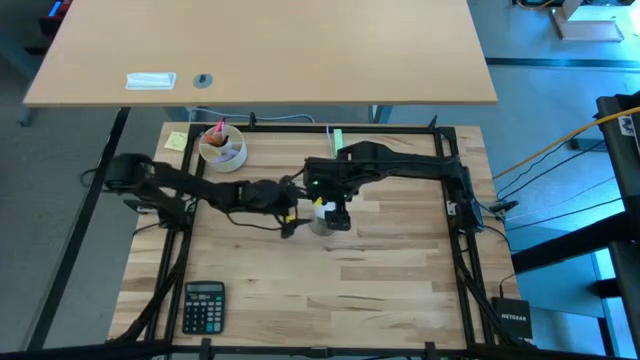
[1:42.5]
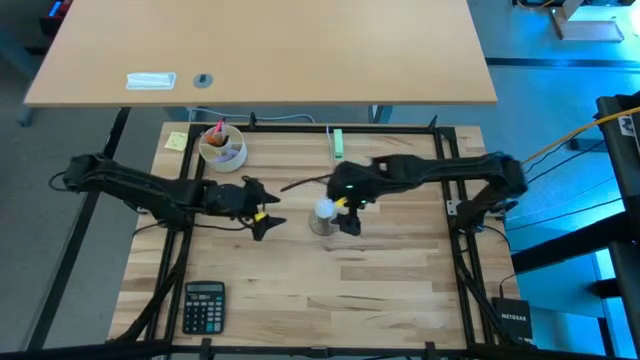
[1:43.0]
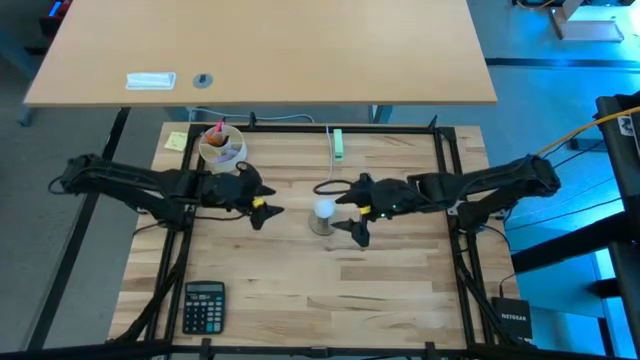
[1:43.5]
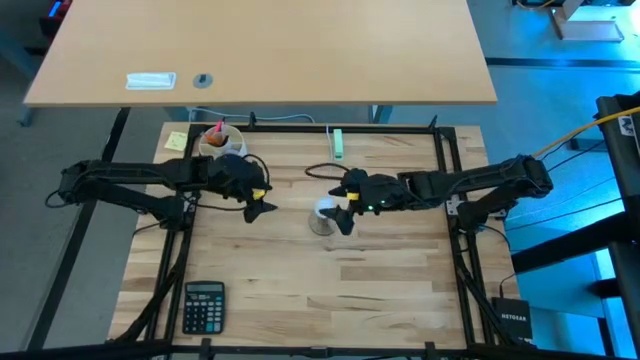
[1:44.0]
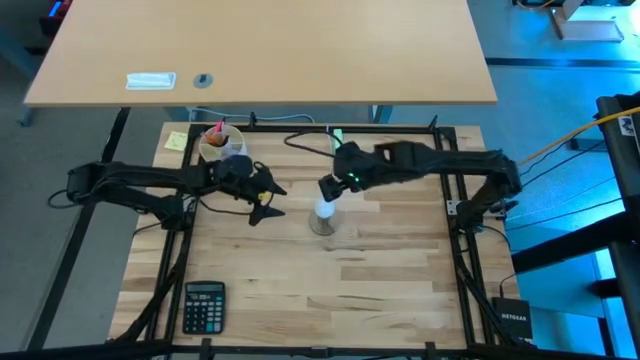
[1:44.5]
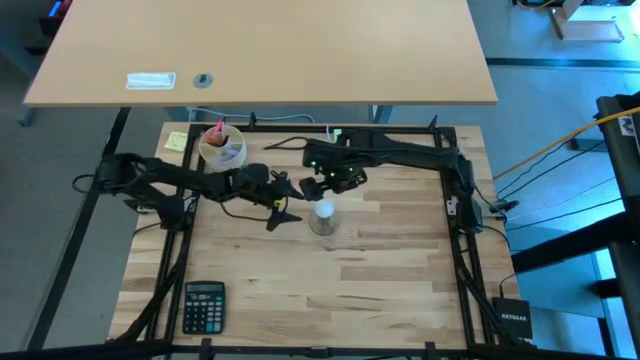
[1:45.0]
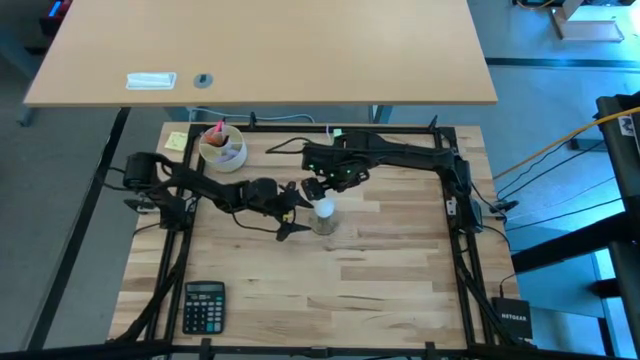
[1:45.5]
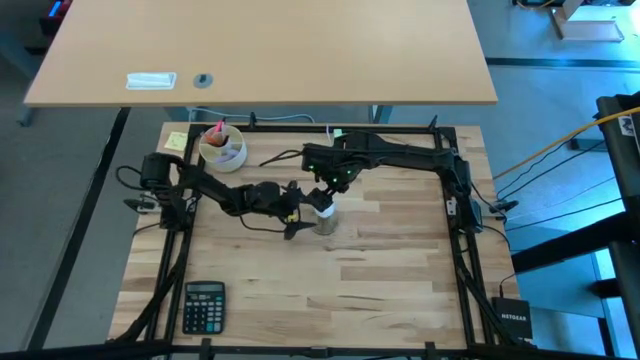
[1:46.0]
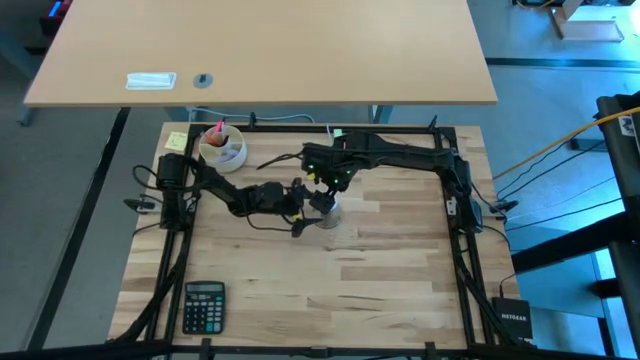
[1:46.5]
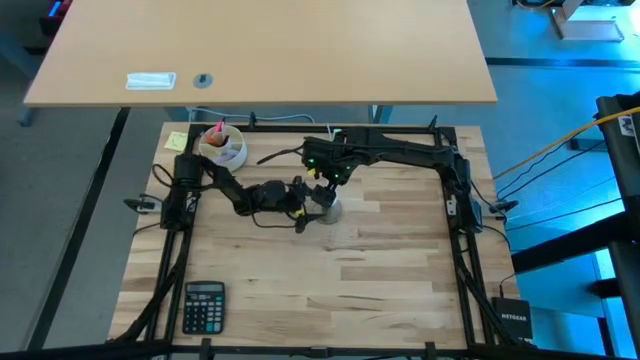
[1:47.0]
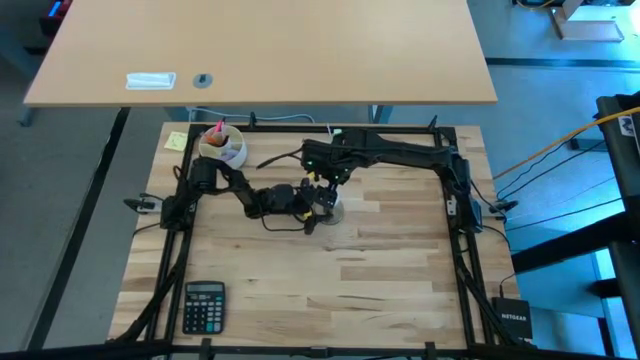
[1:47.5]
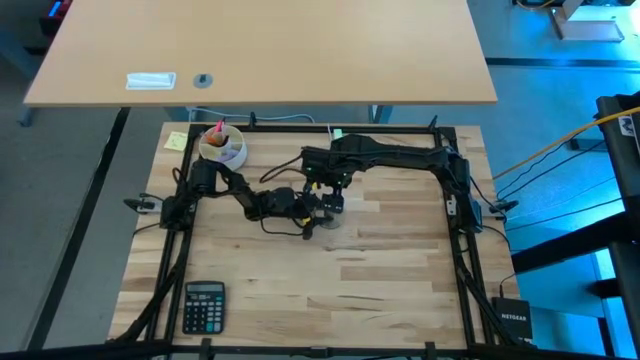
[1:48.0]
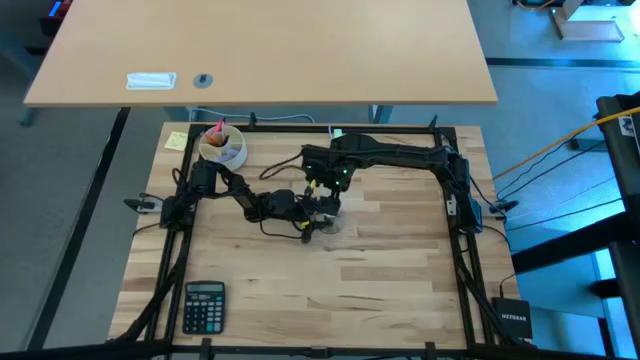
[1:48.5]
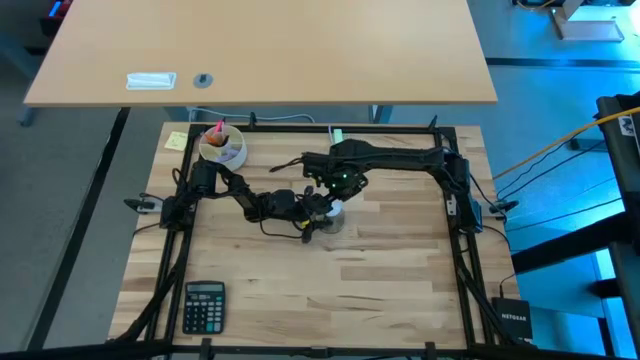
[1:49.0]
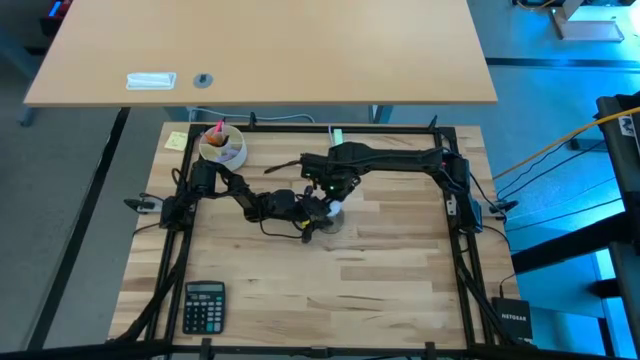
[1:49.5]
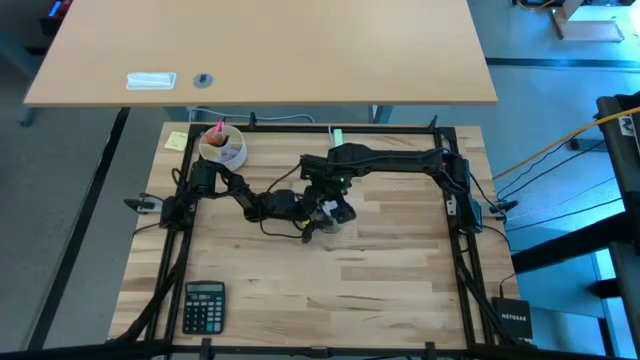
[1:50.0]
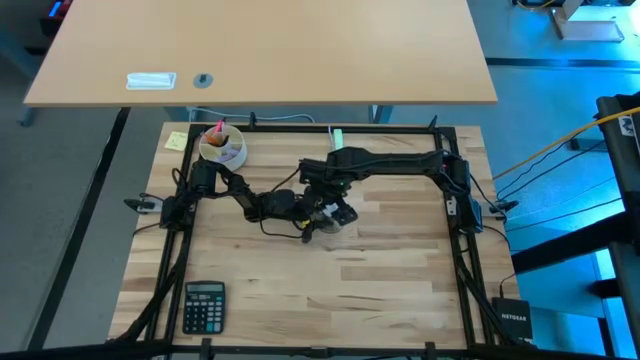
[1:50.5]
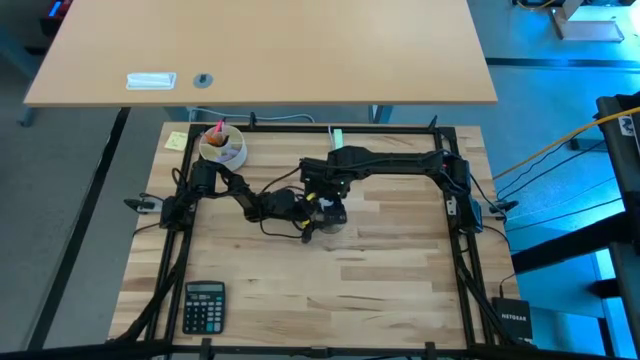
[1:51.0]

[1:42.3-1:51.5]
Task: Screw lightbulb
Remove the lightbulb from the lamp

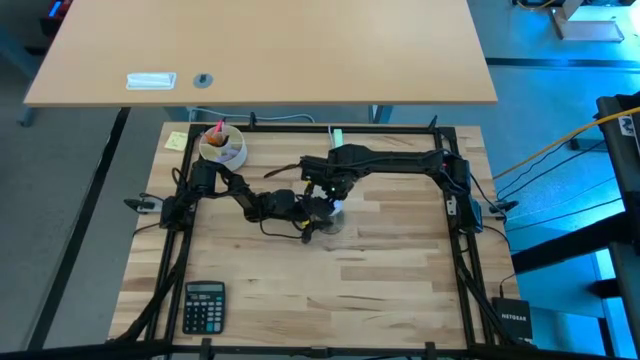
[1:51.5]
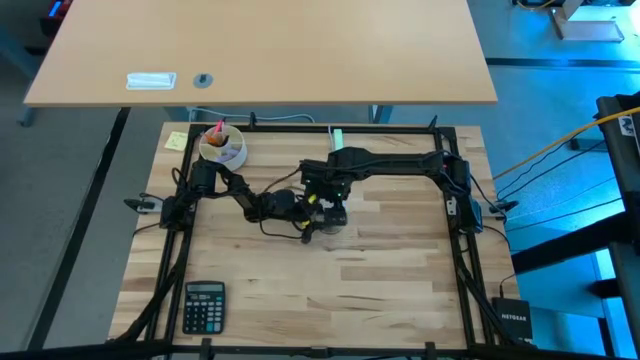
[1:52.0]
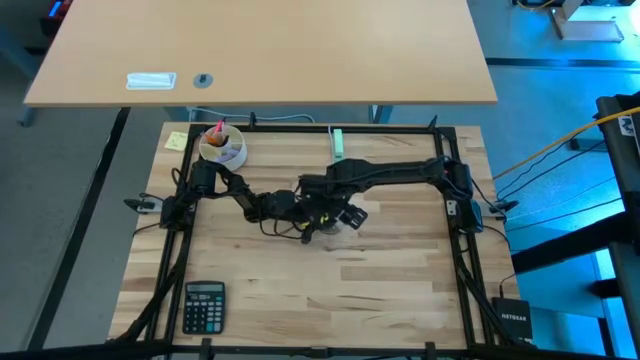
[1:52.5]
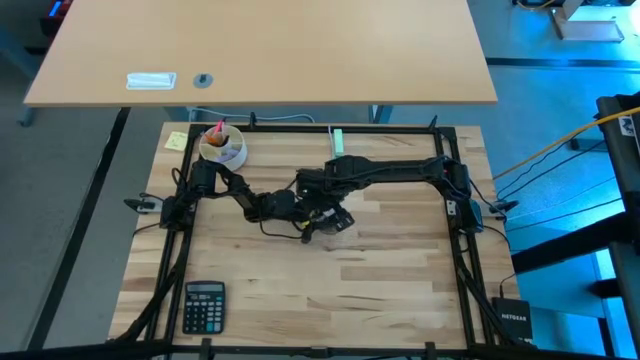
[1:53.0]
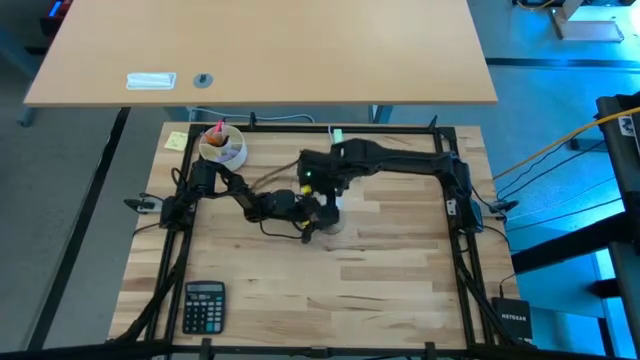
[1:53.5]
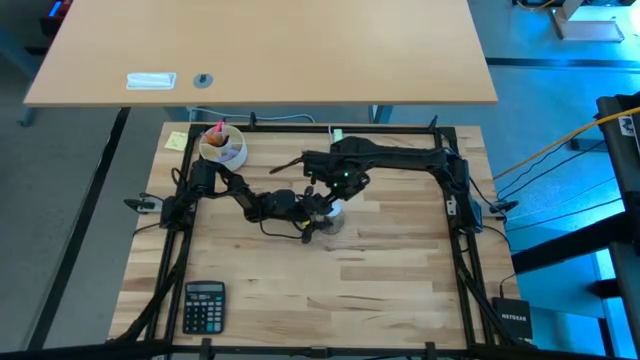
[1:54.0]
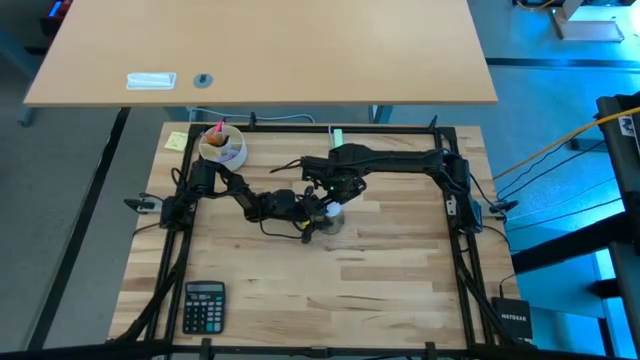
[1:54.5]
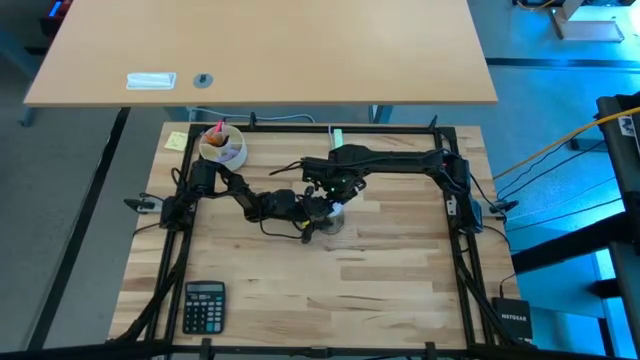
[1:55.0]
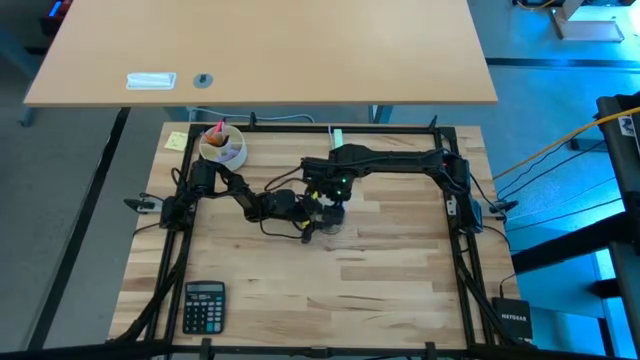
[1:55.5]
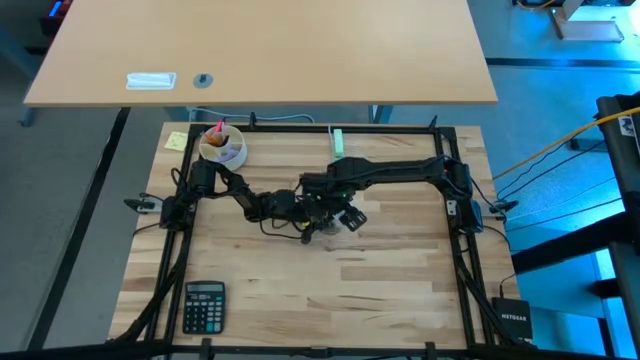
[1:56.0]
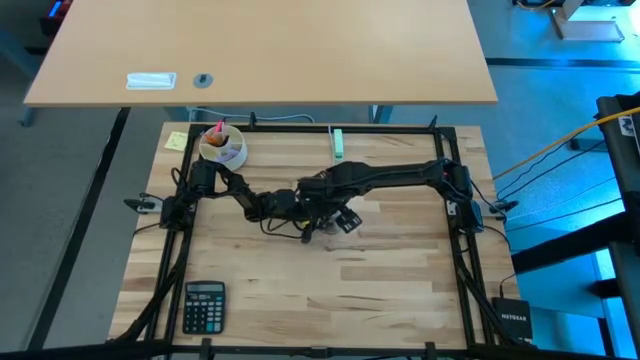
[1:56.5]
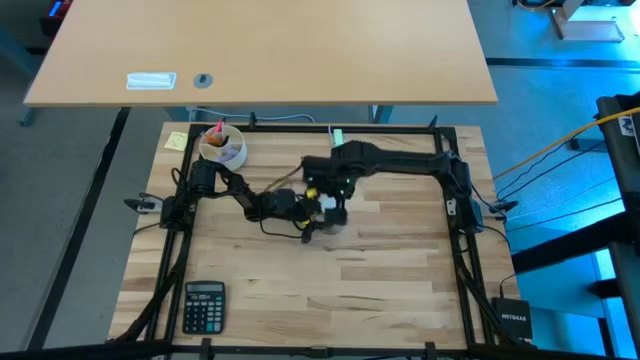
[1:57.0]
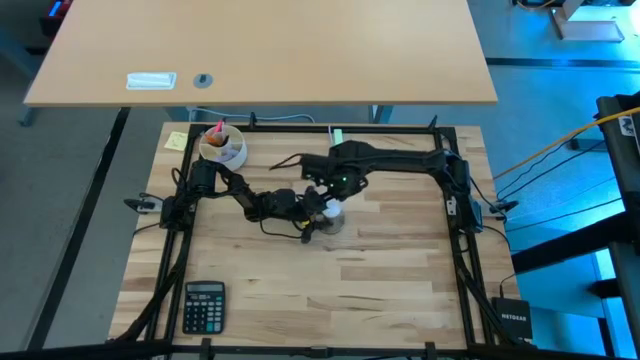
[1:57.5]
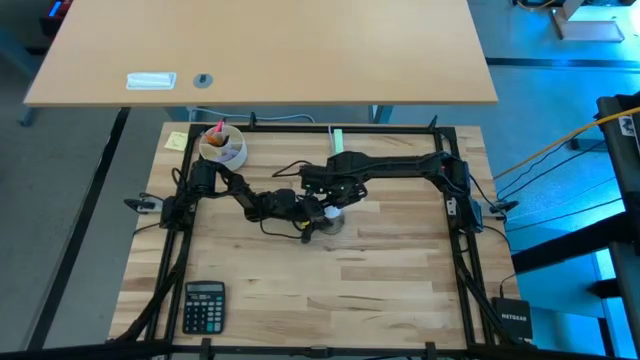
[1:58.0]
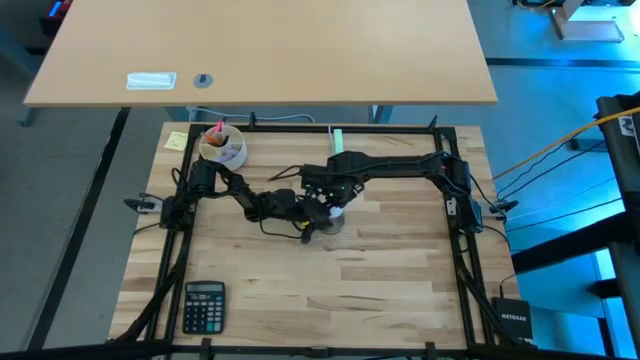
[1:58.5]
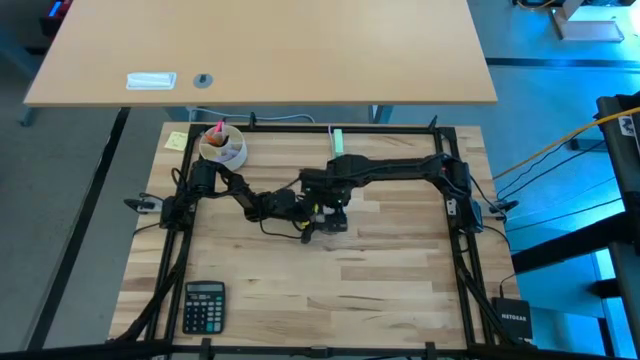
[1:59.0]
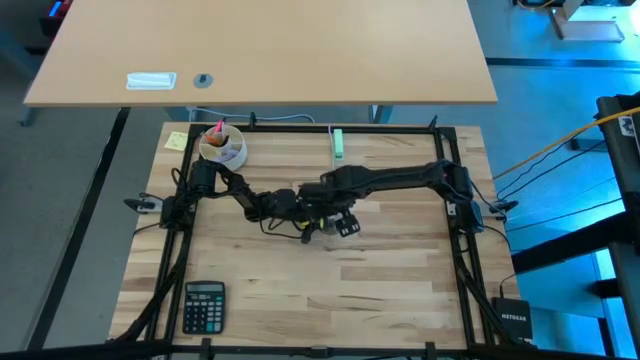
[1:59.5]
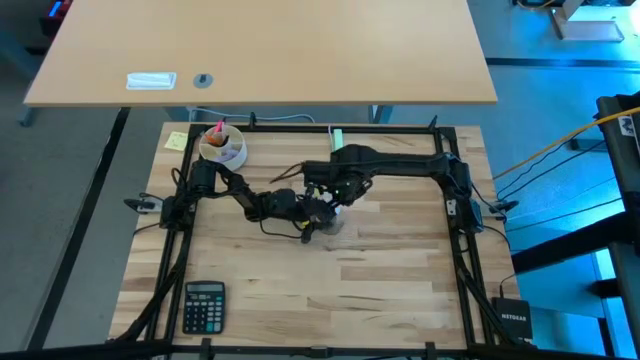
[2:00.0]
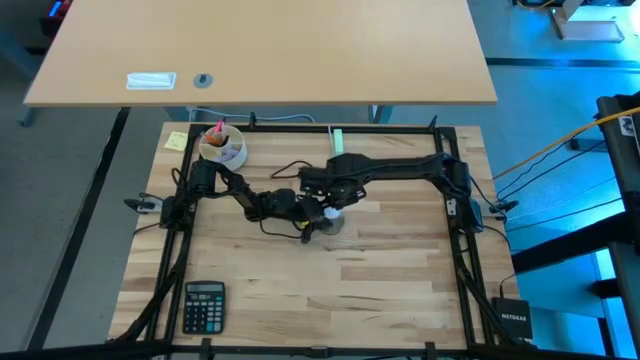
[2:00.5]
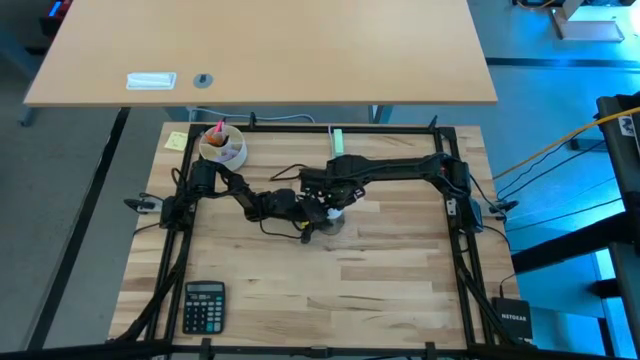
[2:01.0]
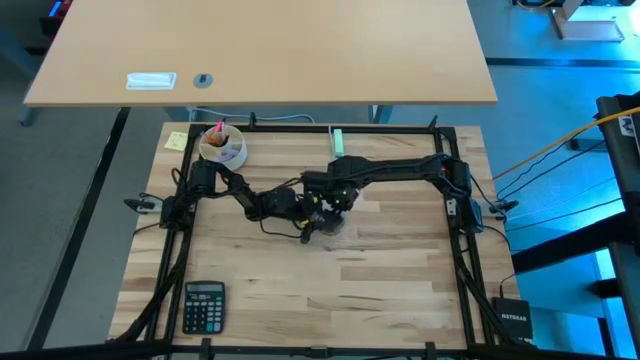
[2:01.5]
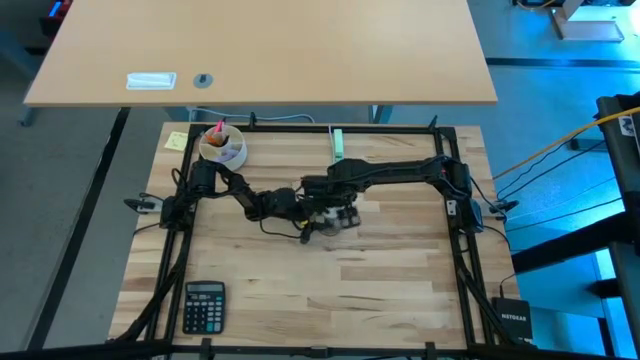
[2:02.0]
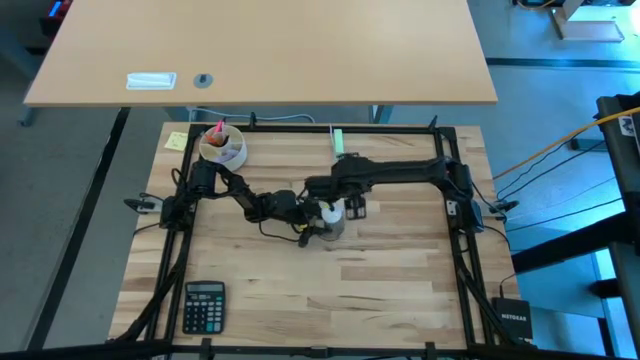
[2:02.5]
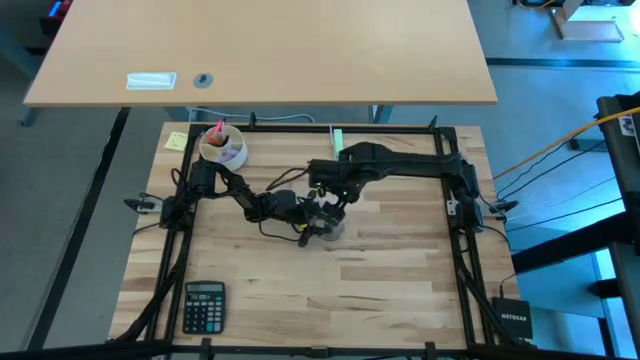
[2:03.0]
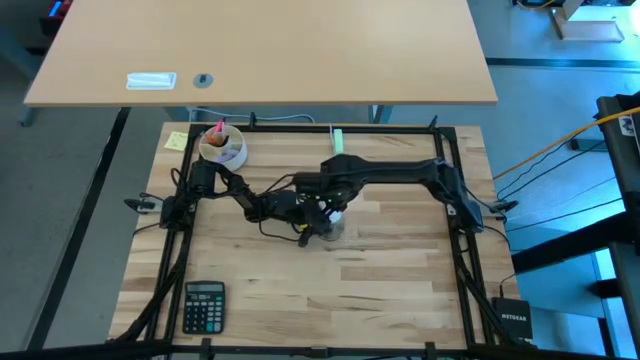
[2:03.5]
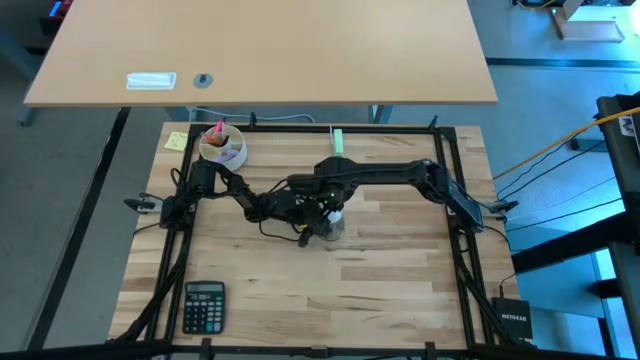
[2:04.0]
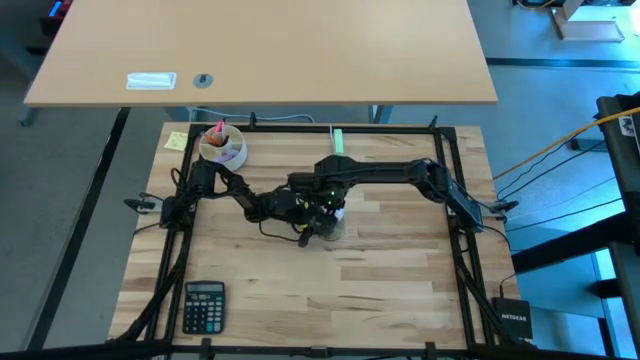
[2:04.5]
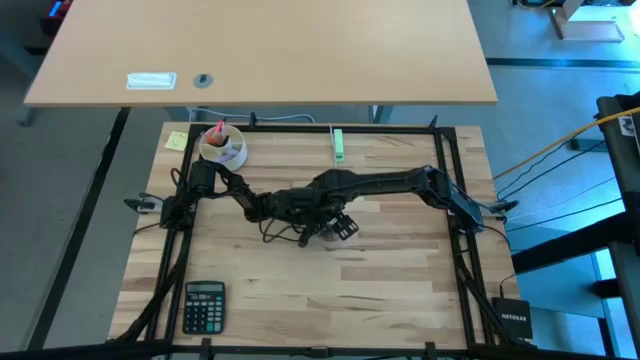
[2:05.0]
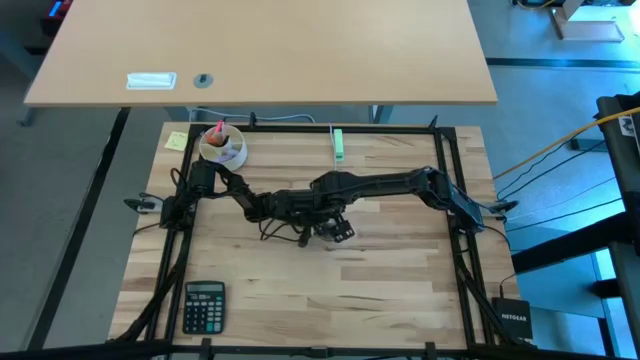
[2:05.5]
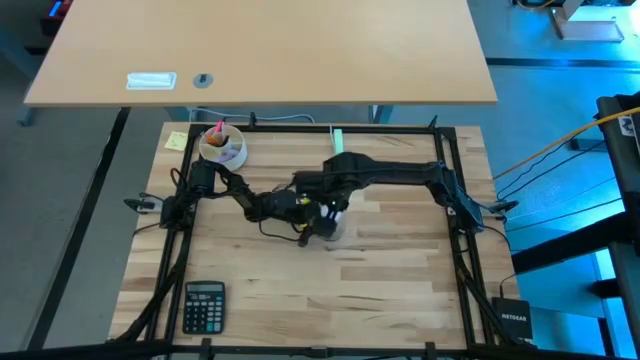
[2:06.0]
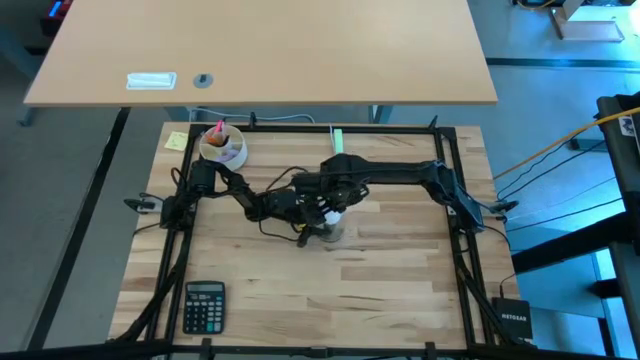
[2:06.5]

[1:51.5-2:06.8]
Remove the lightbulb from the lamp
